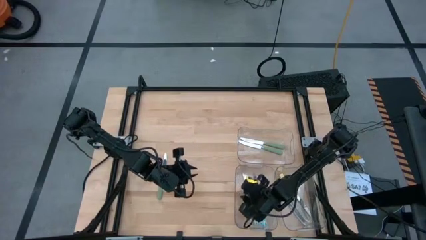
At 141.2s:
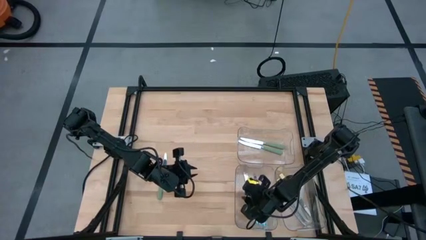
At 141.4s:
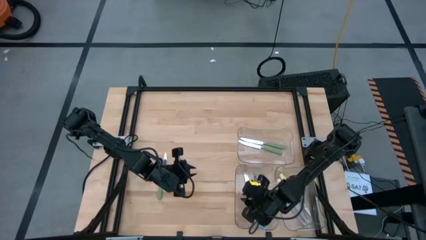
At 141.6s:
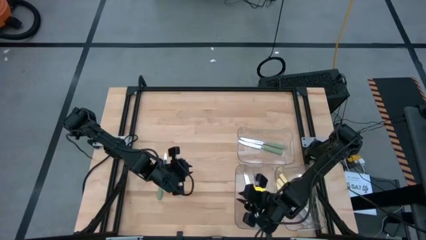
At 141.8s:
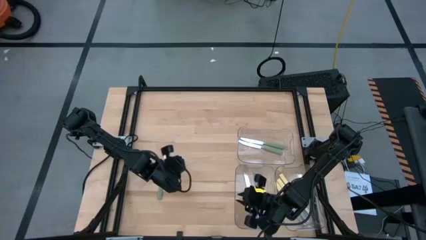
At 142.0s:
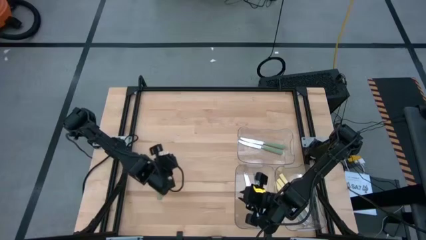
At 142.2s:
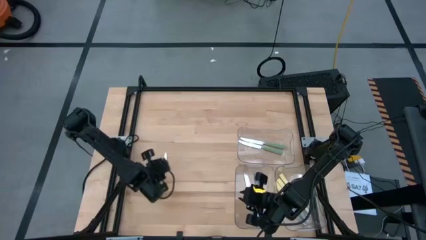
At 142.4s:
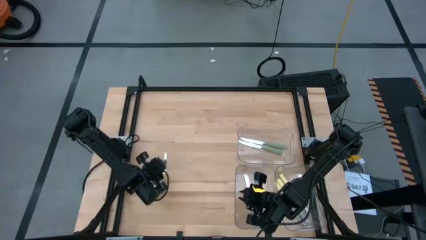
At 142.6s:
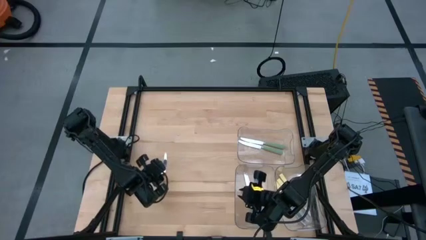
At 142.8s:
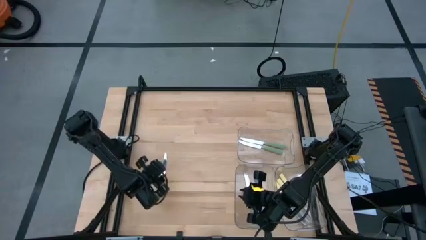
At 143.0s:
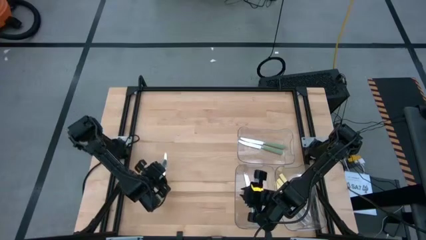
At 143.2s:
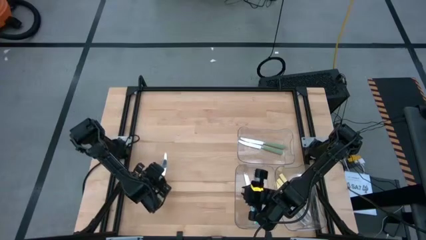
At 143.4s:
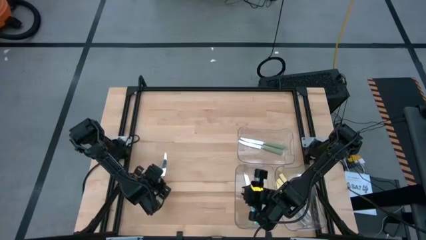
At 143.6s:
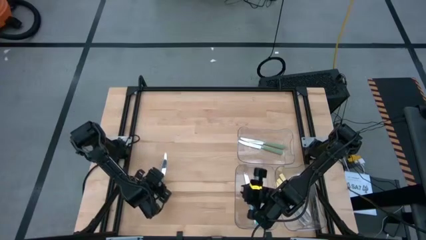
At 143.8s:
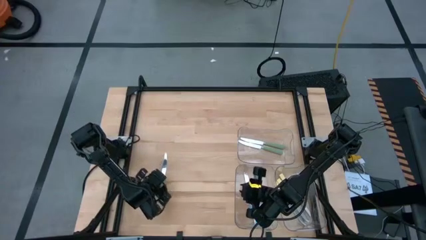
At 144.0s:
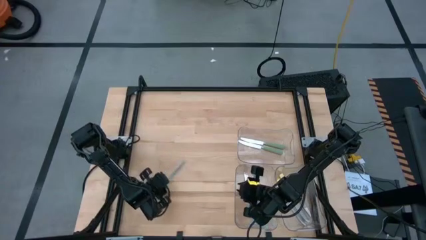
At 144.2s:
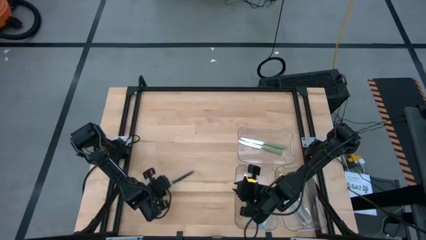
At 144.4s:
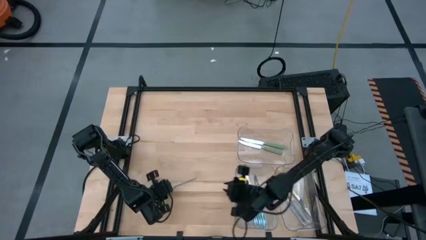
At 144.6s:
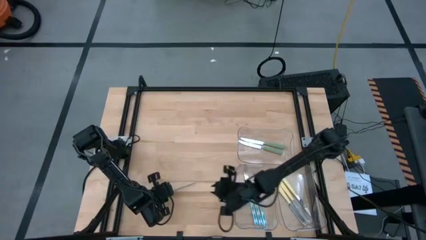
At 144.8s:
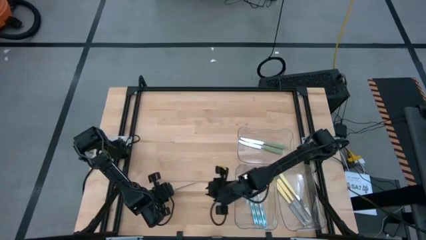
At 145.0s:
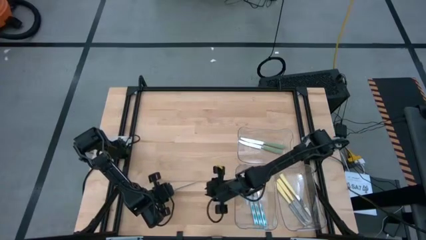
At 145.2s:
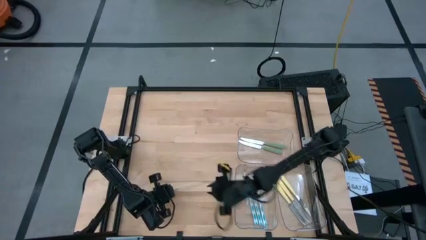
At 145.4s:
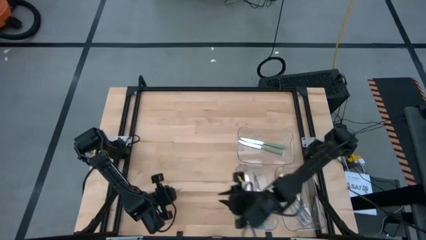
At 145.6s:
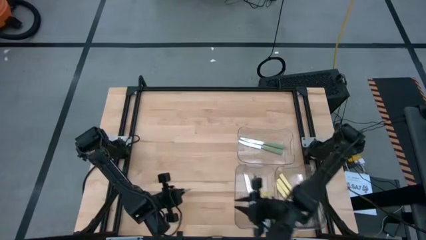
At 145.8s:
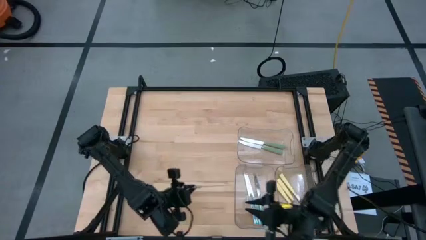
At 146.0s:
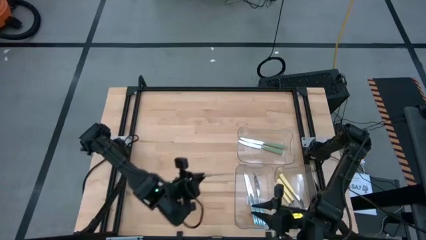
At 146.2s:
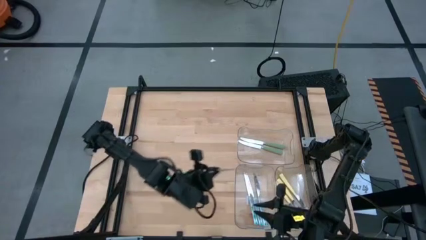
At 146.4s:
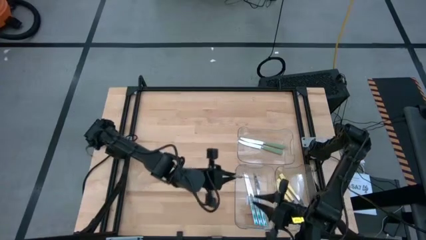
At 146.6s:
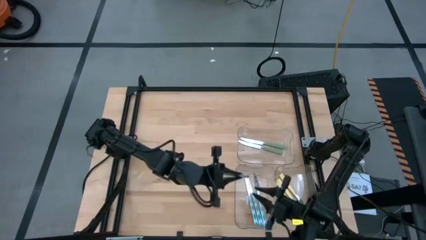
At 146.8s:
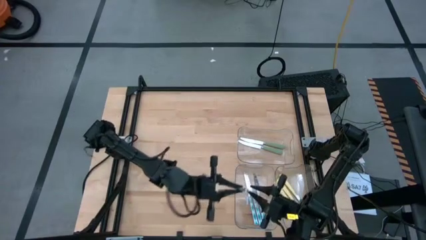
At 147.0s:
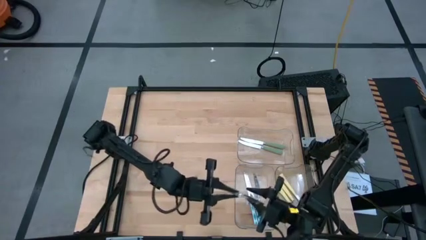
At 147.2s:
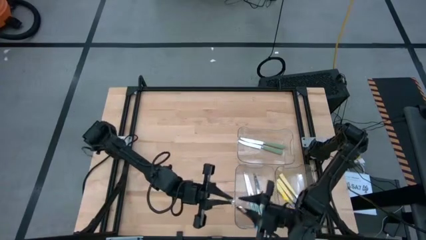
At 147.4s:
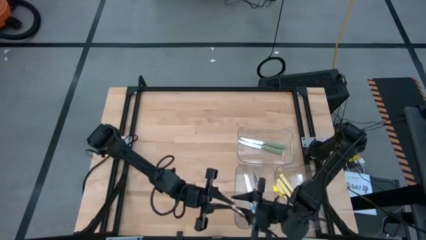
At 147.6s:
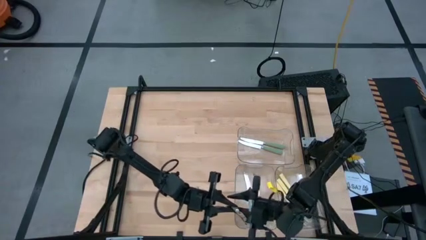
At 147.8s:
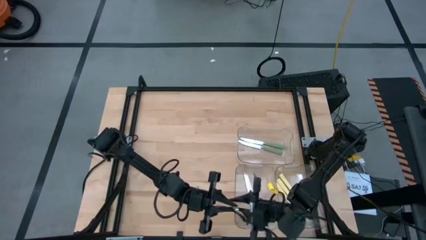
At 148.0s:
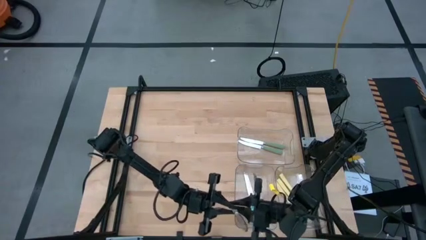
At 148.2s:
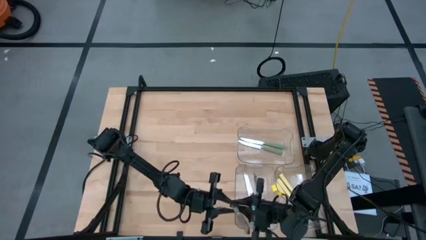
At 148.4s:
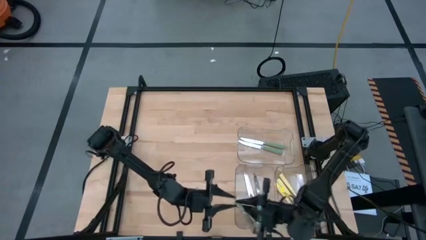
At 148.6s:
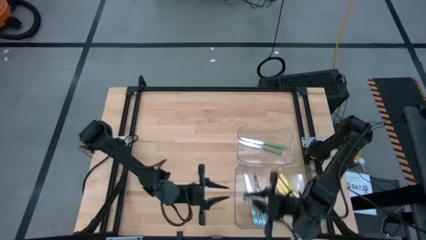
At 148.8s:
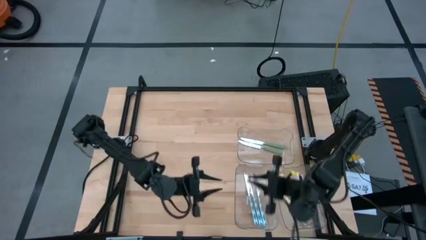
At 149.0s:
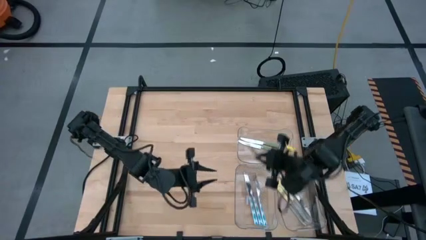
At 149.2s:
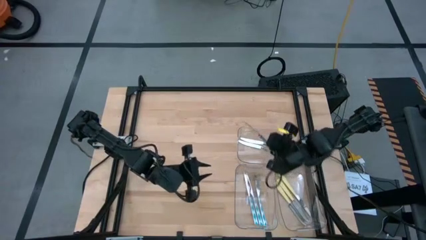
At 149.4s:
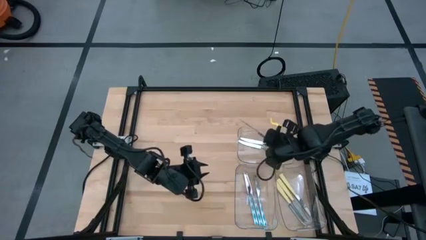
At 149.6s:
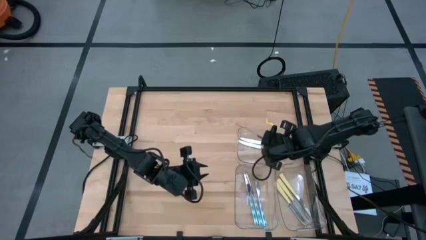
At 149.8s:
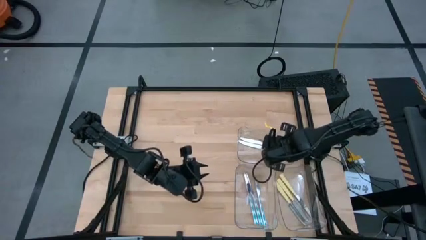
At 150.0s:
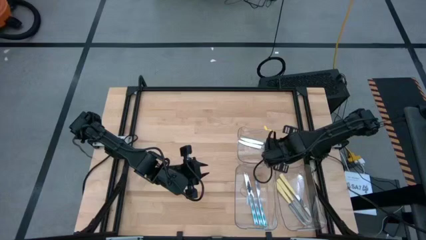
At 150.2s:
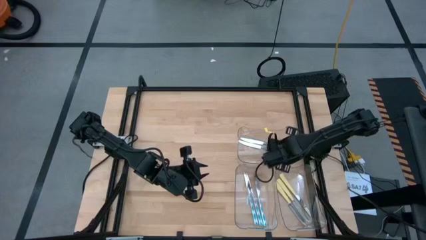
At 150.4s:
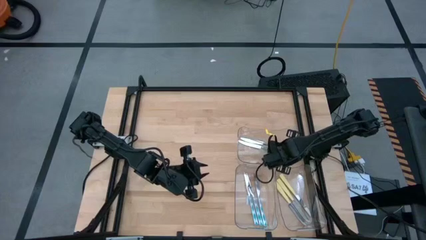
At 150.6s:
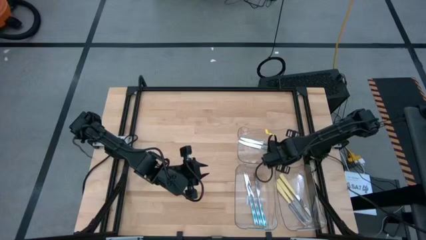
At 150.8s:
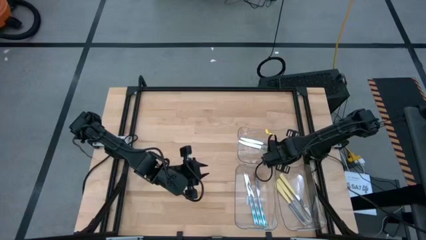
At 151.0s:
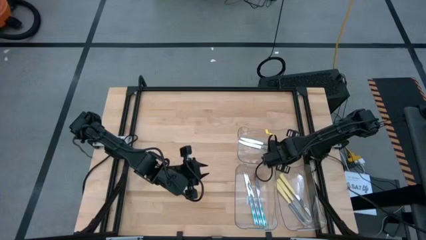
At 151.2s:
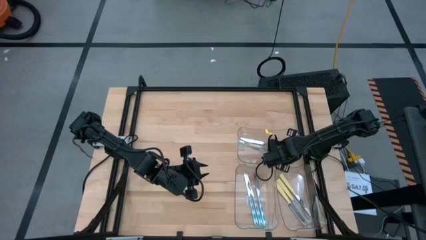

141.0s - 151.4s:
Task: Sort silverware by color (type)
Put the green knife into the top transparent bin

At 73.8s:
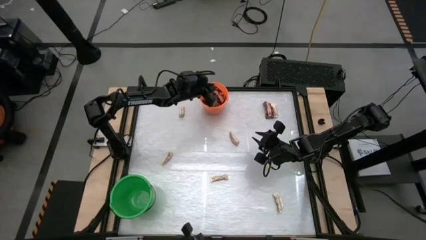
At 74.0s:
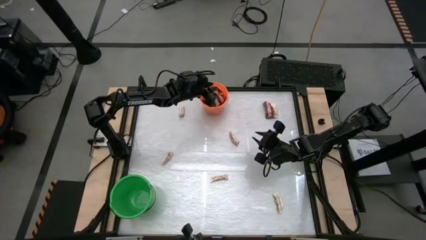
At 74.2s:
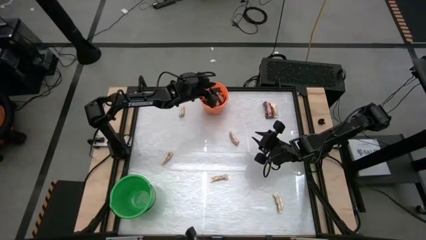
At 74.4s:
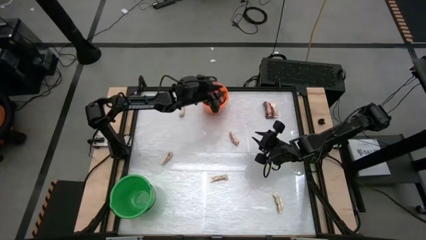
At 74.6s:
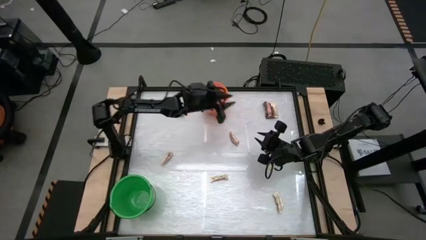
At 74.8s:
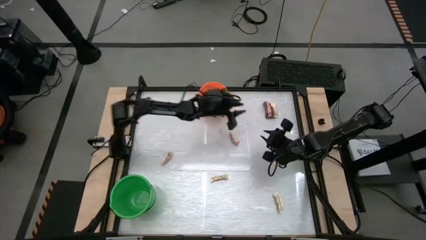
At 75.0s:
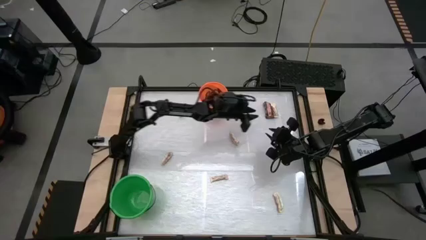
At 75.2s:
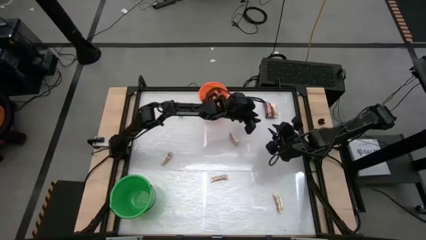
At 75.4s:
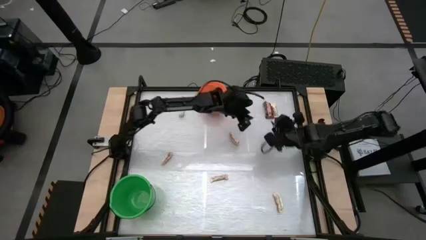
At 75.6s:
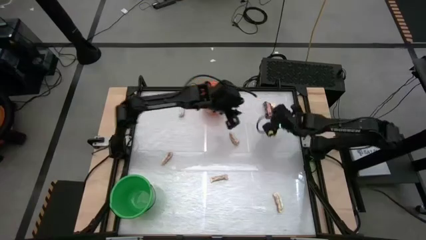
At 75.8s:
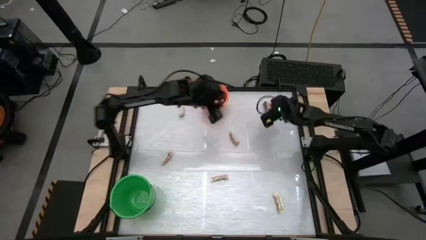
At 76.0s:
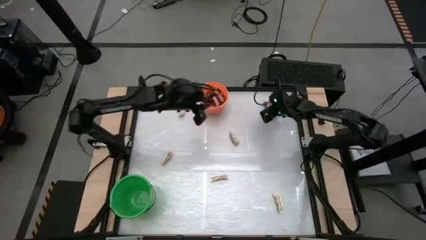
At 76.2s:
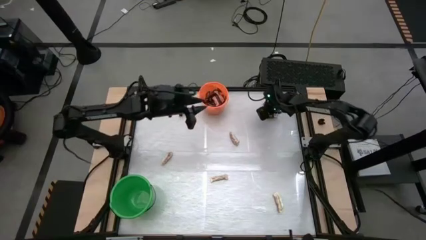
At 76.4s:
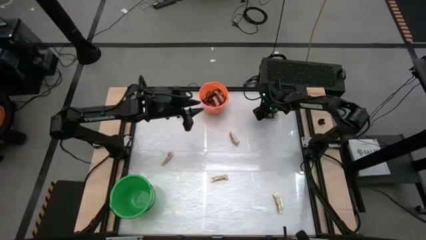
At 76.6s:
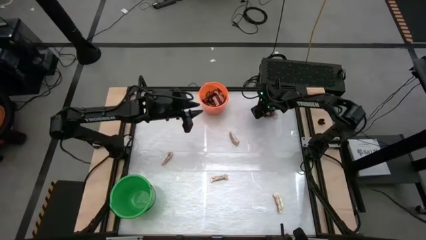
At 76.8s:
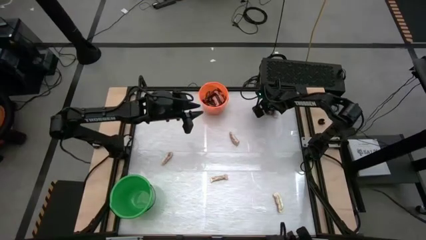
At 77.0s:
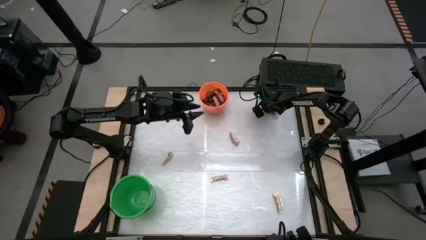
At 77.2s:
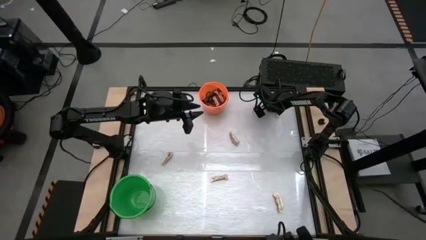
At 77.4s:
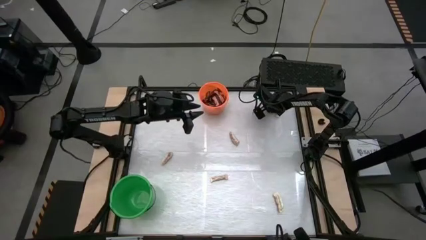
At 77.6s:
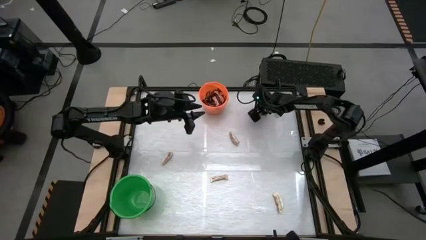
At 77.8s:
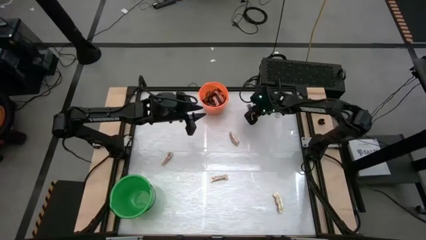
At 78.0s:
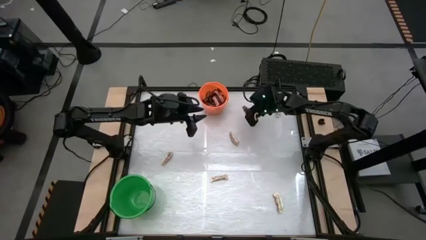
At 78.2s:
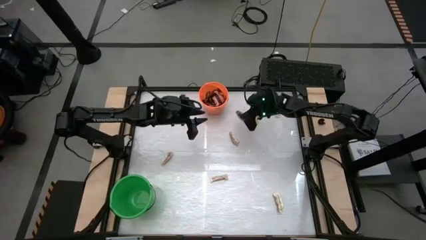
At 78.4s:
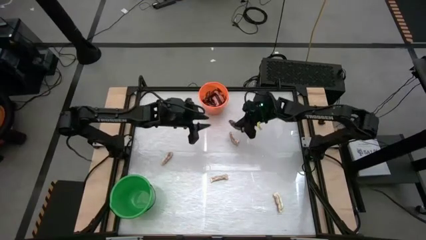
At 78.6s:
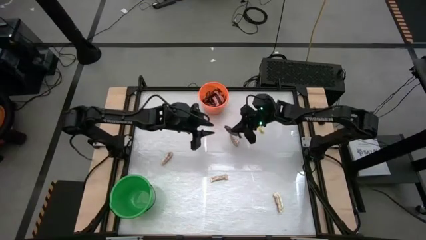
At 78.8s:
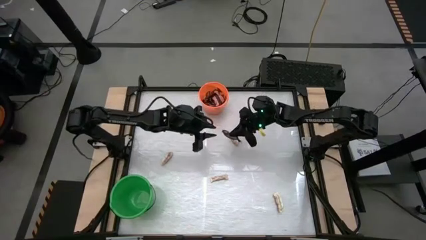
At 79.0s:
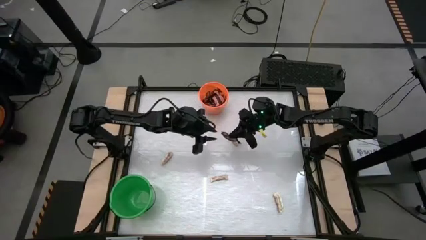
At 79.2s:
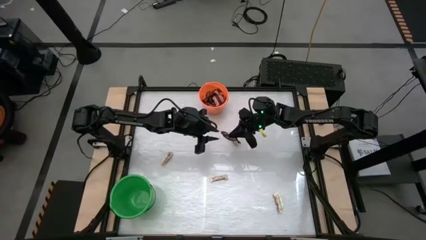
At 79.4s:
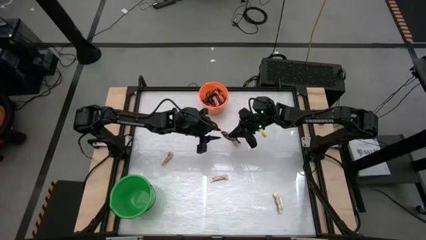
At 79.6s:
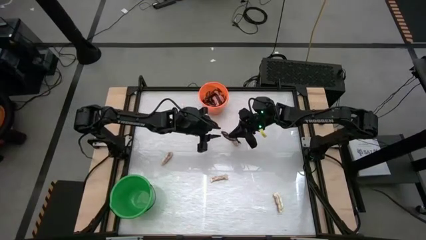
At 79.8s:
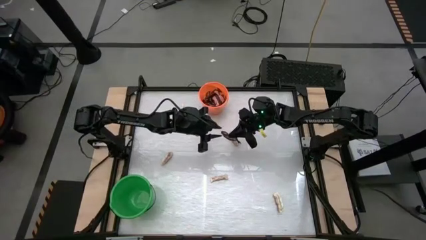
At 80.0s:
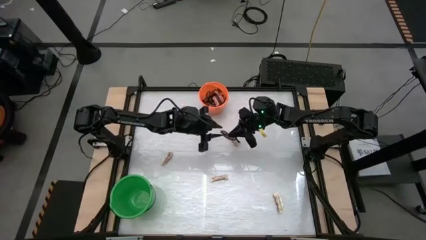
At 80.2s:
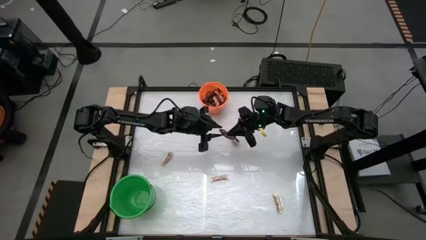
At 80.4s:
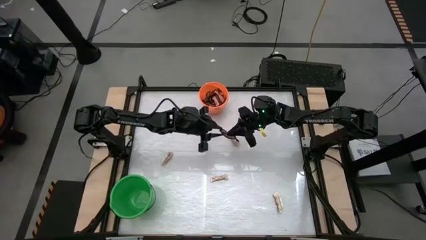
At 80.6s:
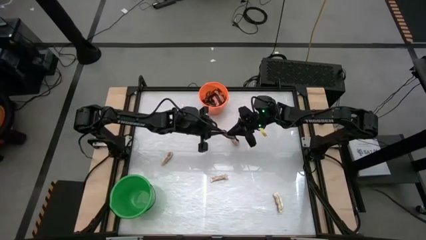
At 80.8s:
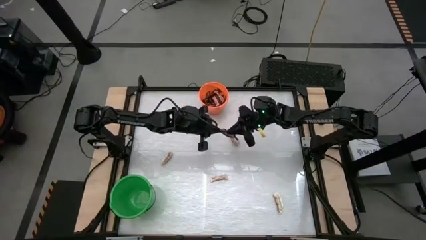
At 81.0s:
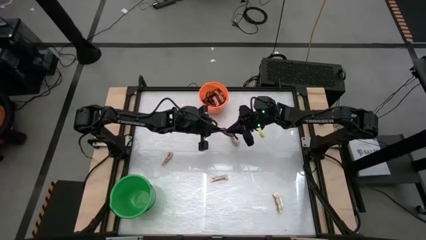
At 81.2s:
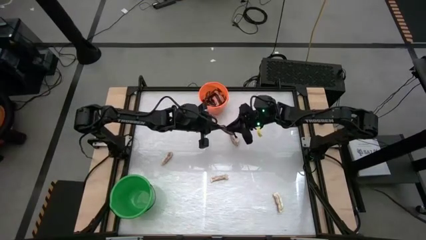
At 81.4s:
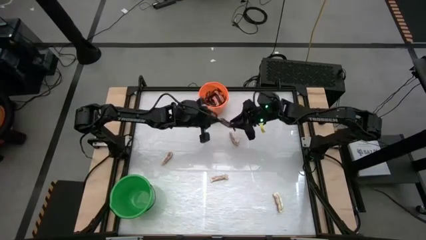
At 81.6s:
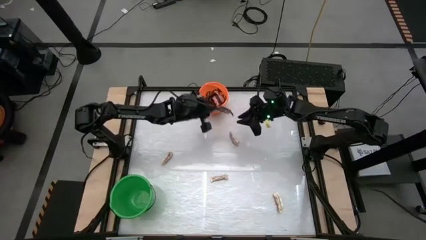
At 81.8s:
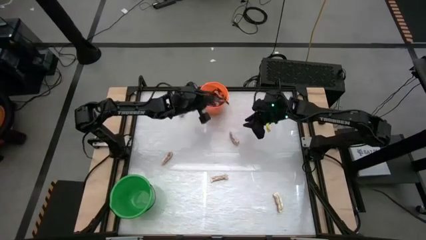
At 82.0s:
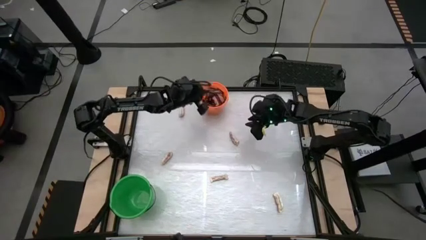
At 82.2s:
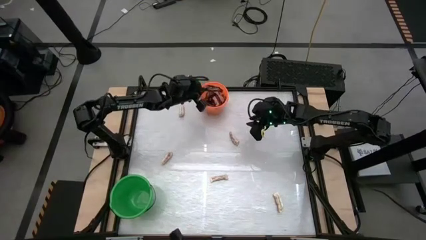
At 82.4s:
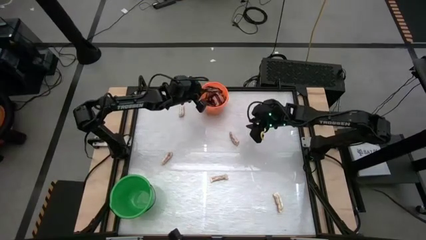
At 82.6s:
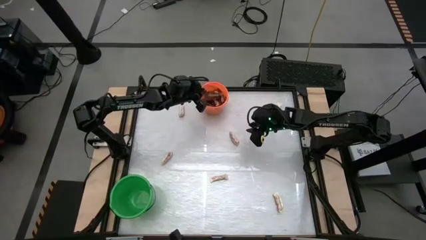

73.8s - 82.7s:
Task: Sort candy by brand, put in halloween buckets
Put the brown chocolate bar into the orange bucket
